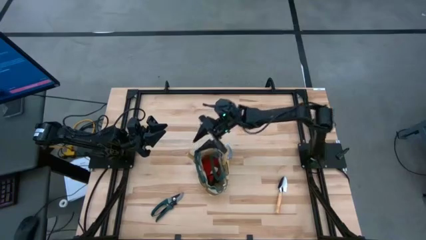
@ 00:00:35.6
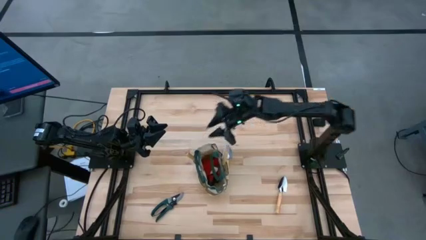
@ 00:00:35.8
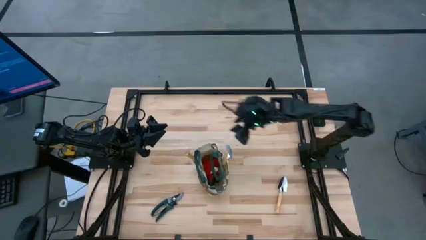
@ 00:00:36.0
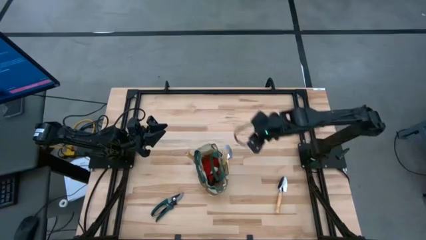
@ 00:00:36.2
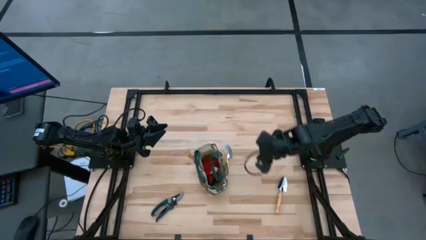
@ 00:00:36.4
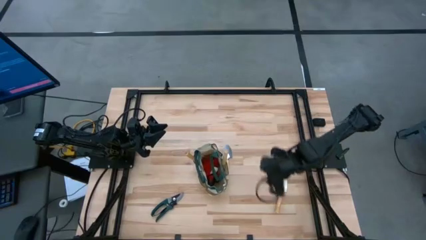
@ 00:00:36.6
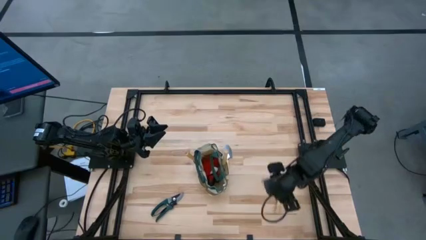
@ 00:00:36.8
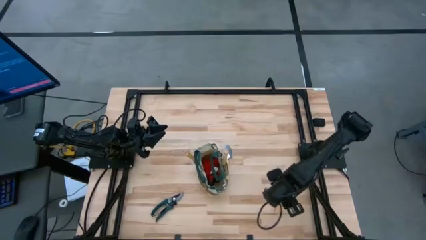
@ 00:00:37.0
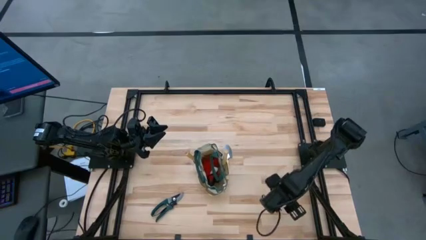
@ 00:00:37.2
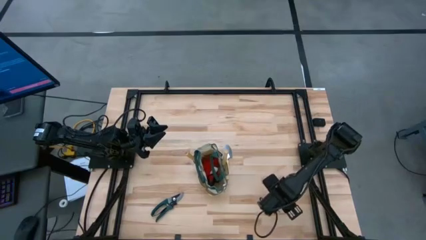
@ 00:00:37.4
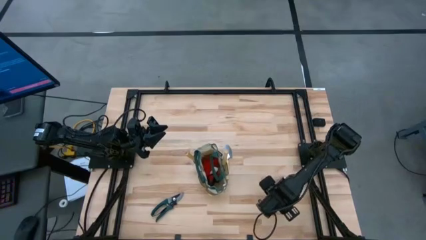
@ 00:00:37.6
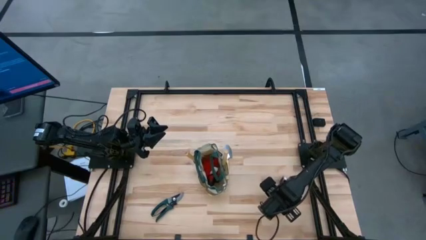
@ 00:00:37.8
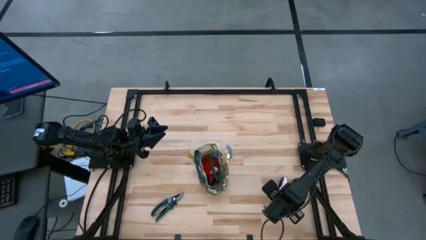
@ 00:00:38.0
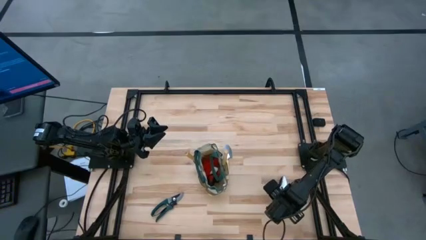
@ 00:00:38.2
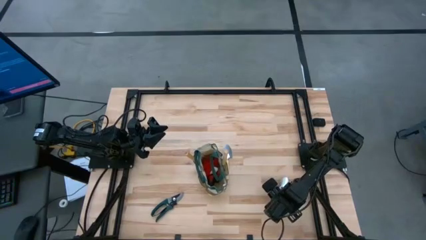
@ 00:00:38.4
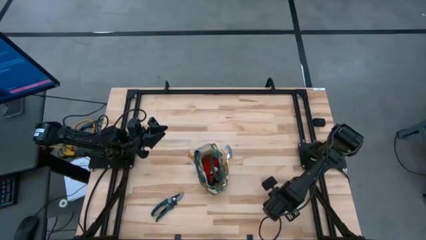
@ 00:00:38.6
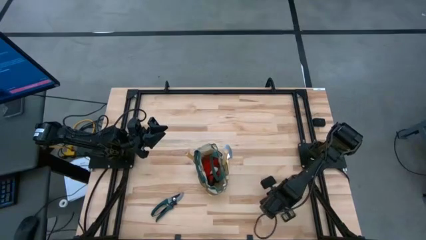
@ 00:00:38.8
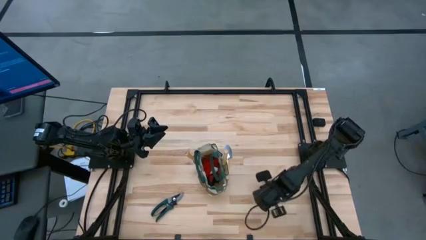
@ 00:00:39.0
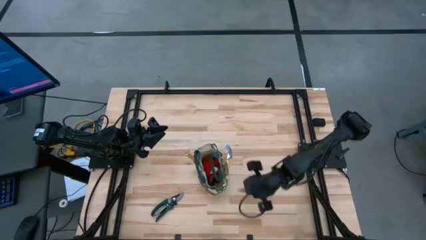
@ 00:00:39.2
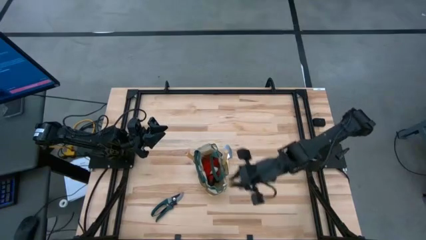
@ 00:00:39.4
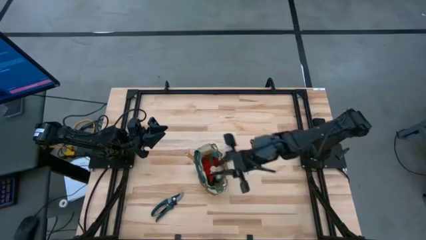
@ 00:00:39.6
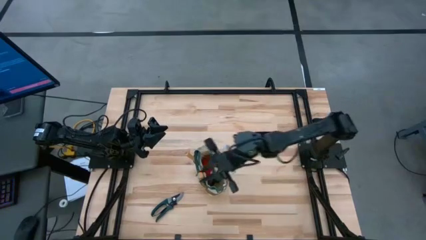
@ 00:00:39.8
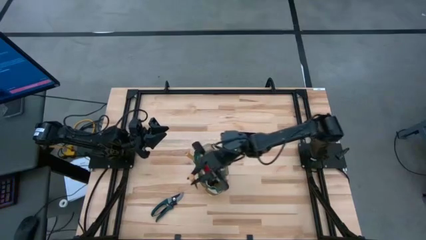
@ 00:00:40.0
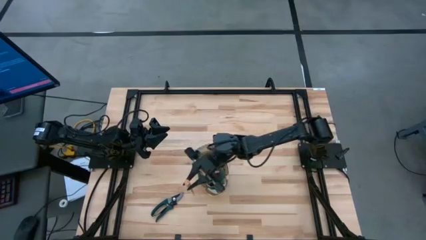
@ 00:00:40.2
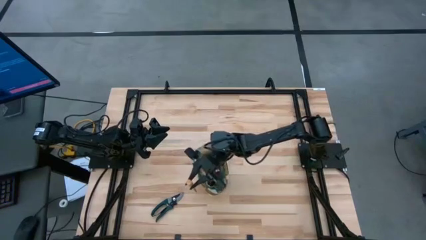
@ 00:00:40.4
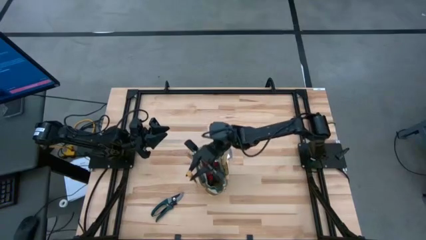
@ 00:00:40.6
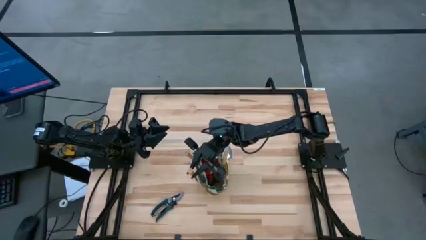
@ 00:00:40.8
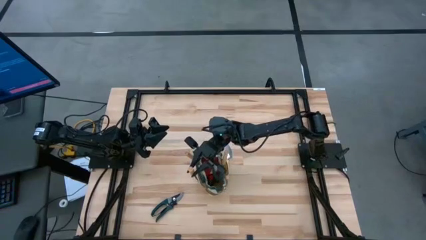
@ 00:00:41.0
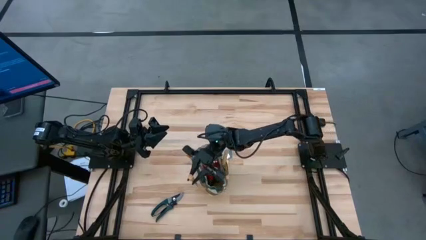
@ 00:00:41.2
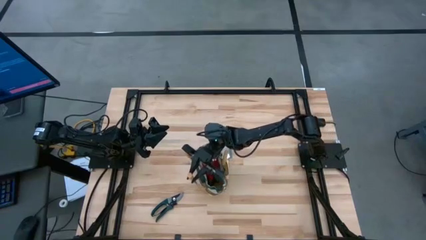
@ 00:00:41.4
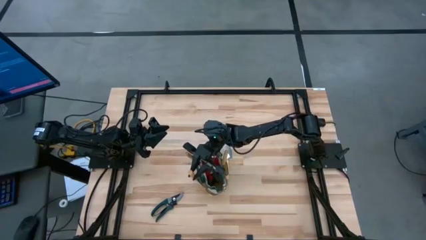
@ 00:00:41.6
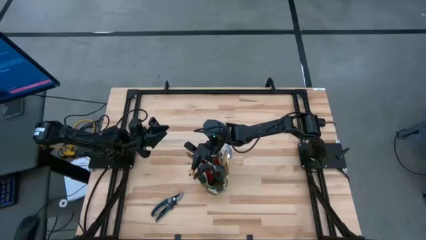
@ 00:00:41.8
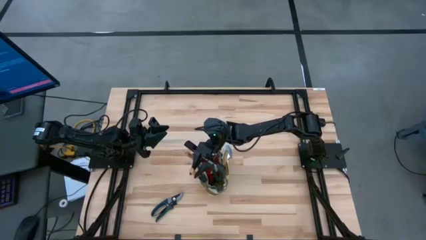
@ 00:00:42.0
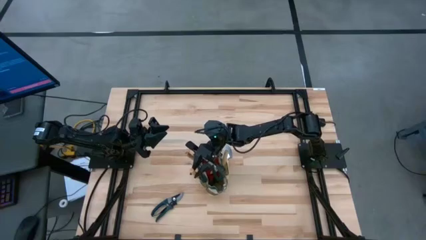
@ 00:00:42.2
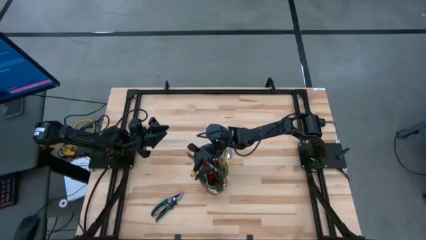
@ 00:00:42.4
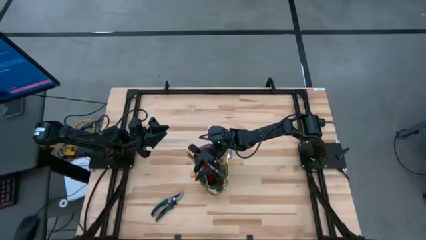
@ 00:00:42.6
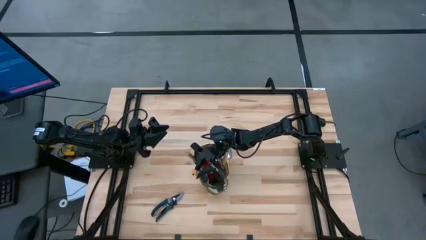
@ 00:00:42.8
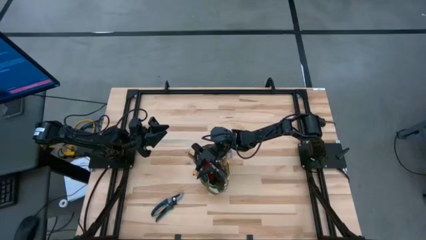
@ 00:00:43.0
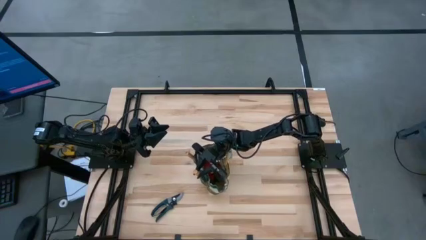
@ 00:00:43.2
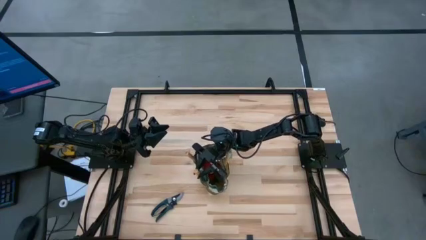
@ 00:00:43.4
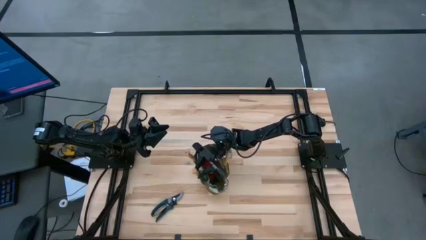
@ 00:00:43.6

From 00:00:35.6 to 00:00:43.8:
Task: Pick & Place Garden tools in Gardening bag
Put the trowel into the gardening bag

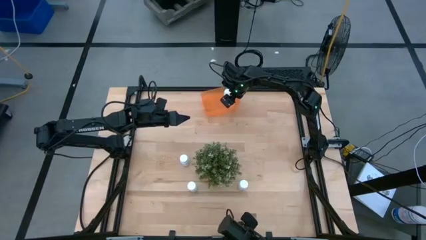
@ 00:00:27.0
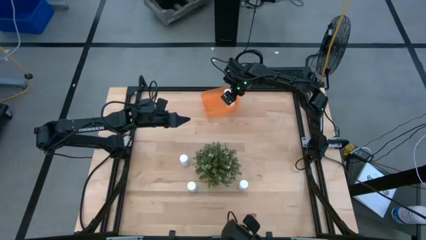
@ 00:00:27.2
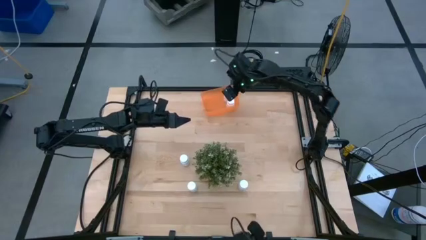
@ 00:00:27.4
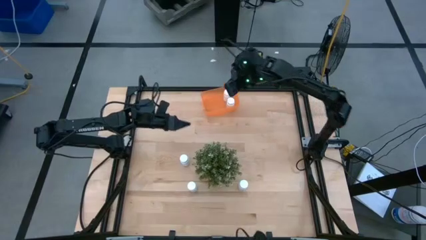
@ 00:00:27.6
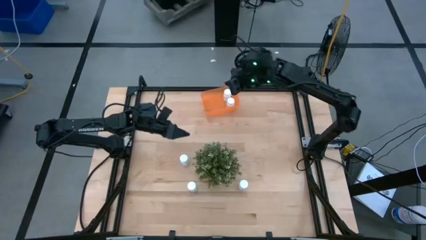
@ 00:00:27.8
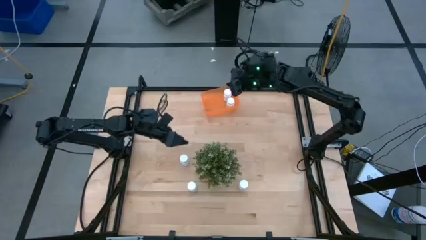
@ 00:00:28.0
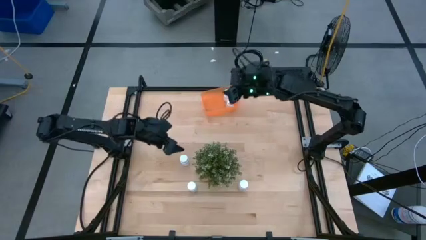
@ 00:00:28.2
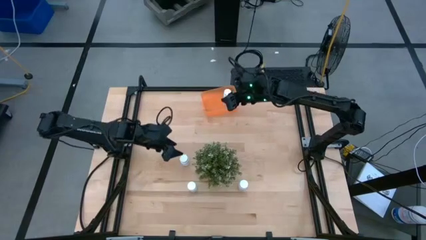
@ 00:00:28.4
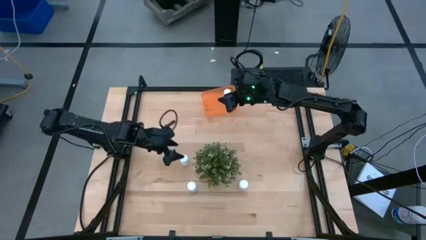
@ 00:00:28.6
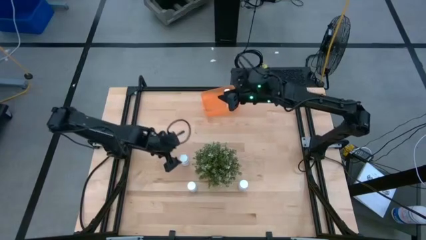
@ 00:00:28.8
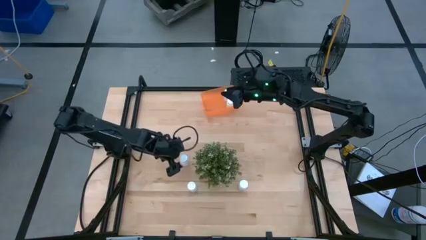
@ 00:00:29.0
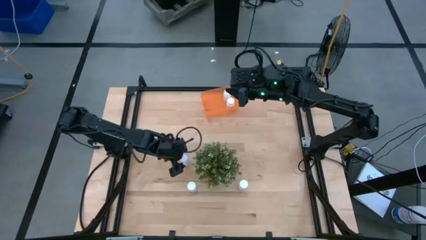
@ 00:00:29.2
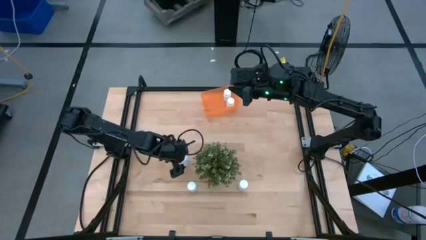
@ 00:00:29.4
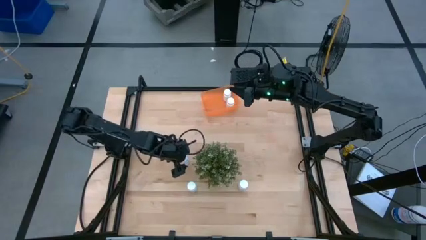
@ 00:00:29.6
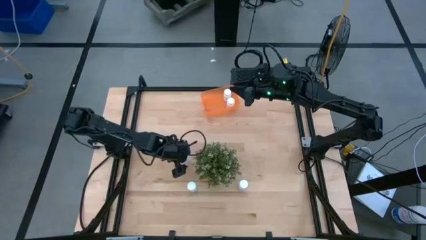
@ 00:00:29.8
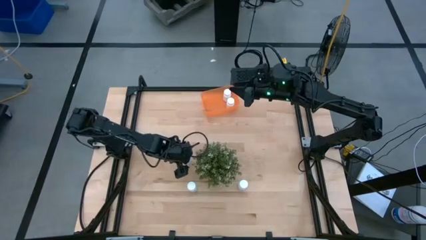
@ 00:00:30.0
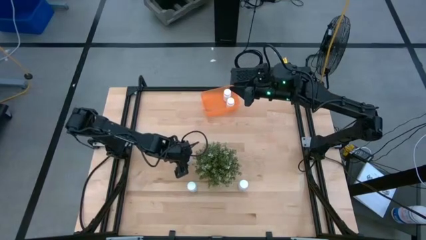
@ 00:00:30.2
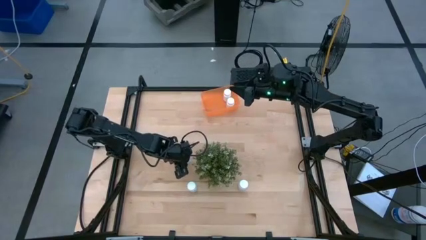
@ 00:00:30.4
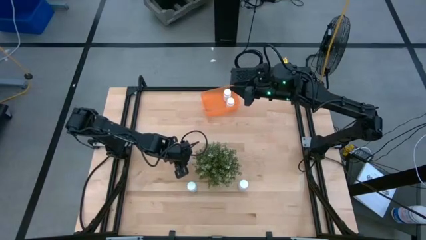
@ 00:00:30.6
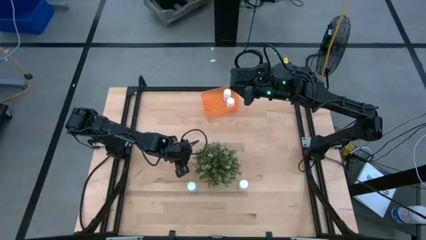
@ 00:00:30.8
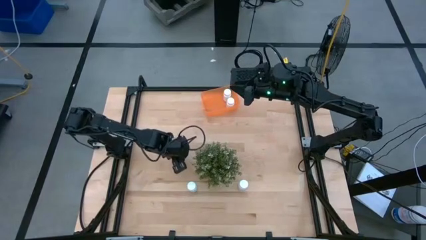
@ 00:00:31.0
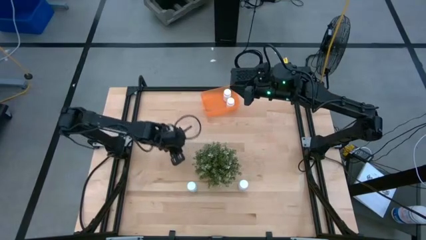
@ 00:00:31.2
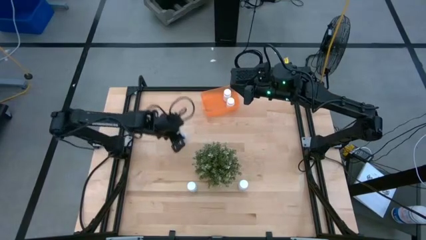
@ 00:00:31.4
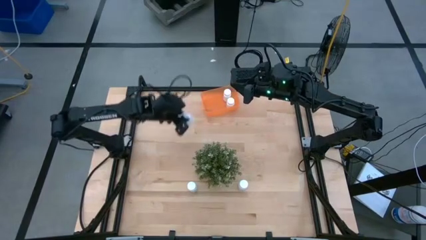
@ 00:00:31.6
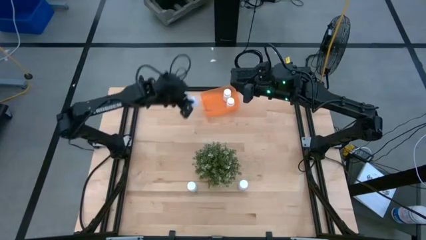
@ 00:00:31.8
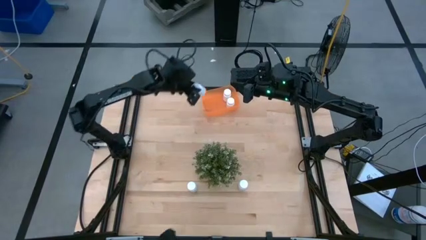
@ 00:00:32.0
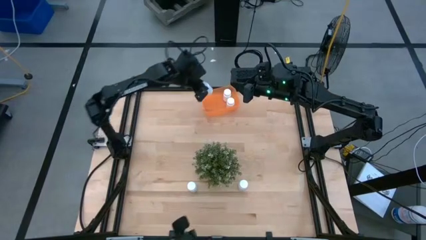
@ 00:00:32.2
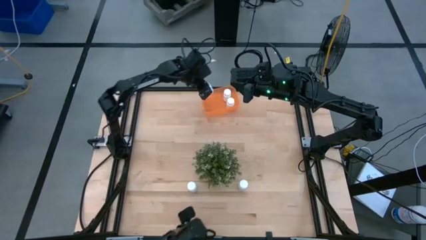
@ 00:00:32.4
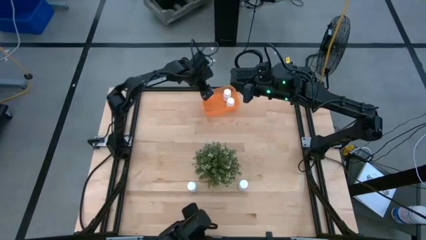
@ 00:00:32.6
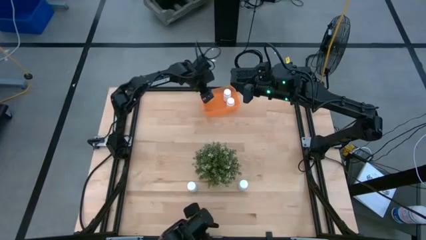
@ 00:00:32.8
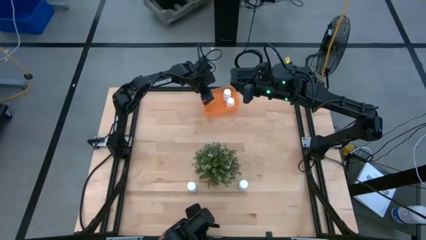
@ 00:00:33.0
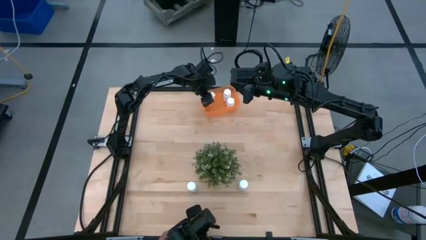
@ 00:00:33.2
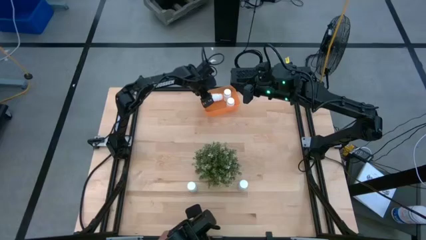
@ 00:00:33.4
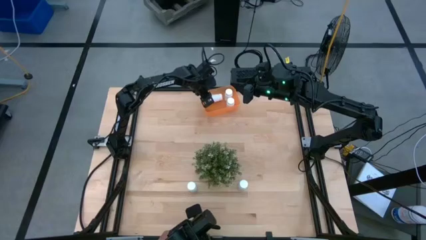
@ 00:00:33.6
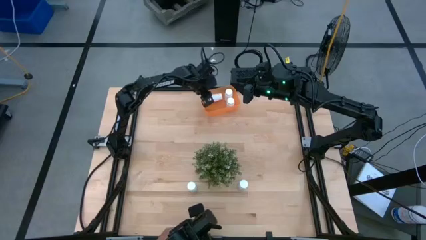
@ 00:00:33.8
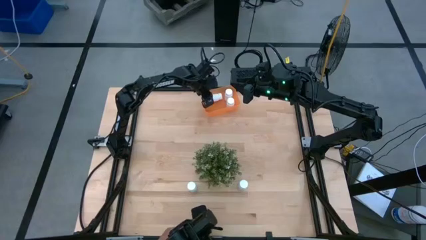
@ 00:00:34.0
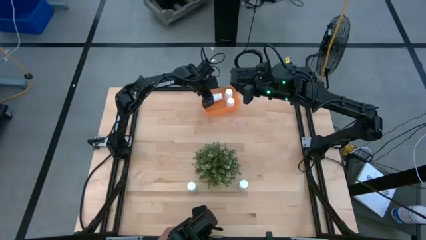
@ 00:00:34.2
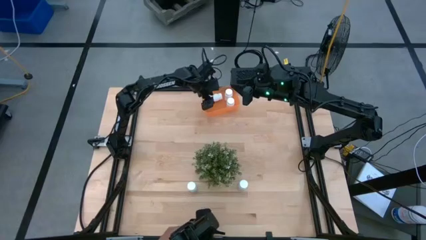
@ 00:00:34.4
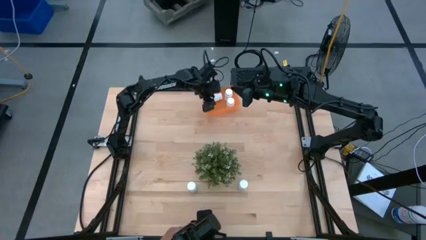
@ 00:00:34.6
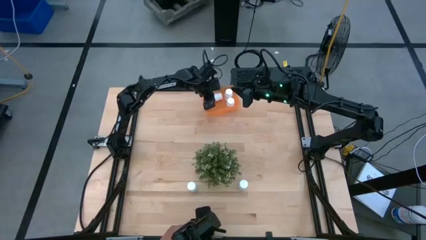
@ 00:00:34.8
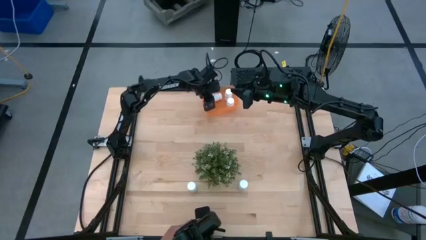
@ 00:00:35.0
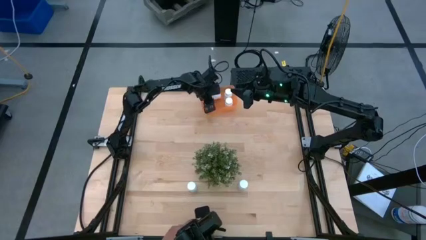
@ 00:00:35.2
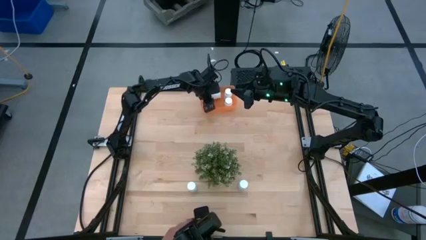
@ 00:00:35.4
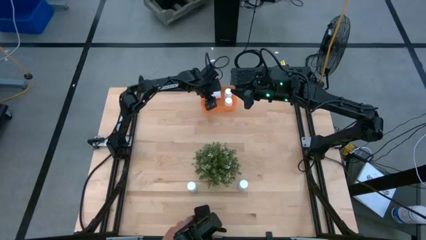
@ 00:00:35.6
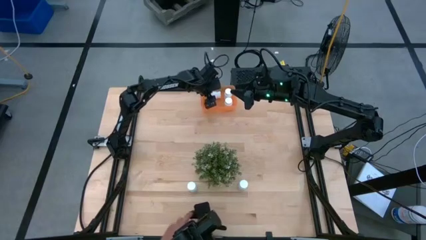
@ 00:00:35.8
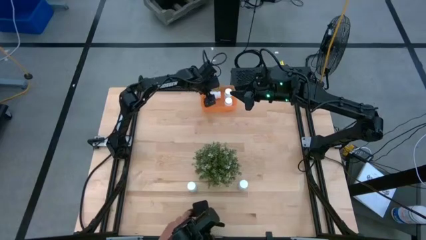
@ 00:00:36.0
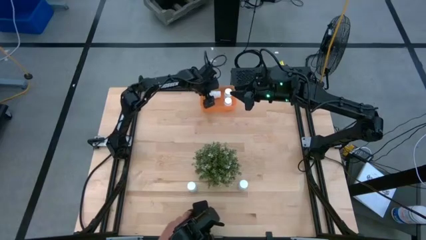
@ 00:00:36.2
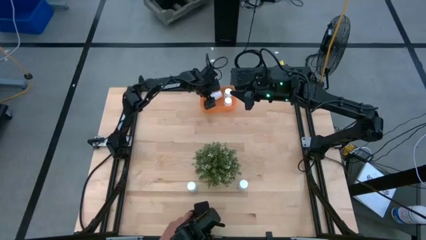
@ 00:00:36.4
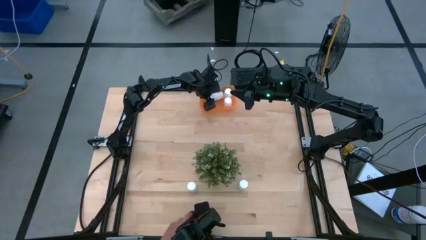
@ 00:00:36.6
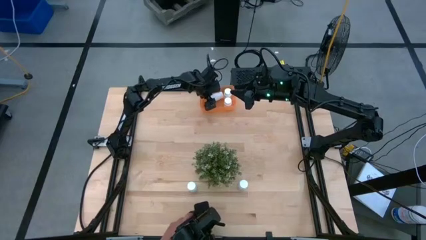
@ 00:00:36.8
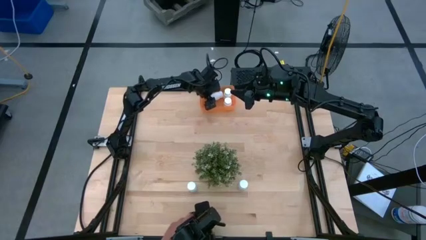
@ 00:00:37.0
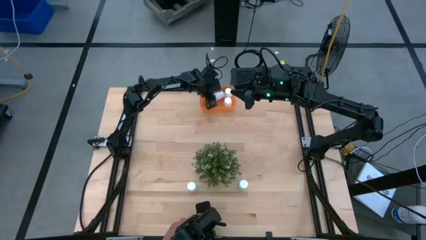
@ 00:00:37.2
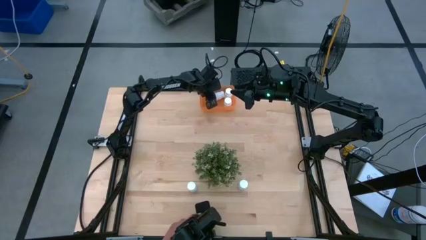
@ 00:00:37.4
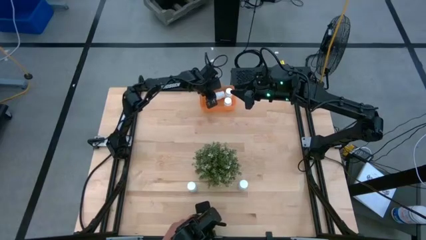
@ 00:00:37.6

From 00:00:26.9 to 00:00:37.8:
Task: Pick and place pill bottles into a basket
Put the top left white pill bottle into the orange bin
